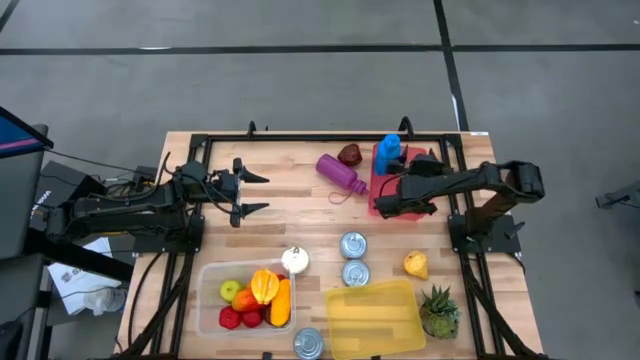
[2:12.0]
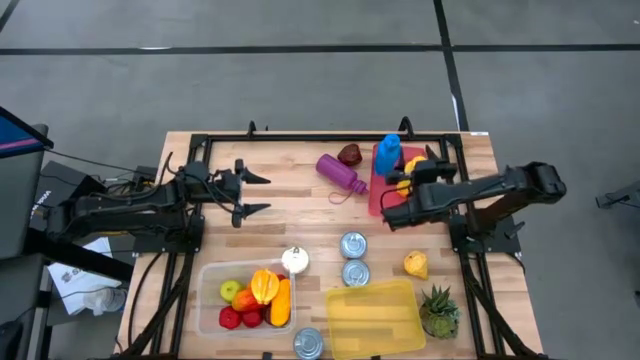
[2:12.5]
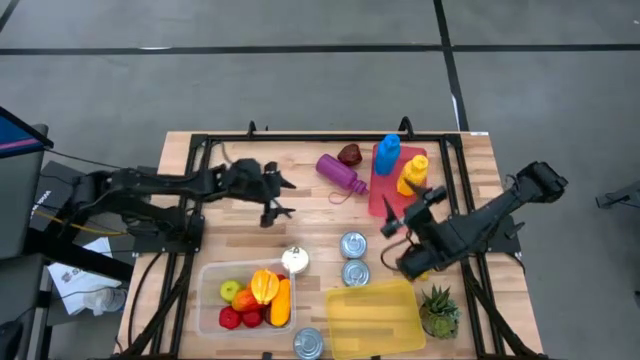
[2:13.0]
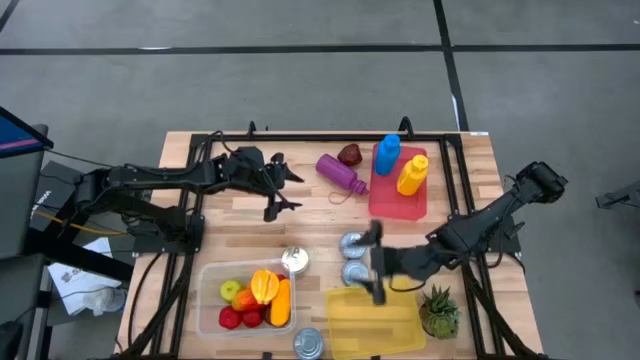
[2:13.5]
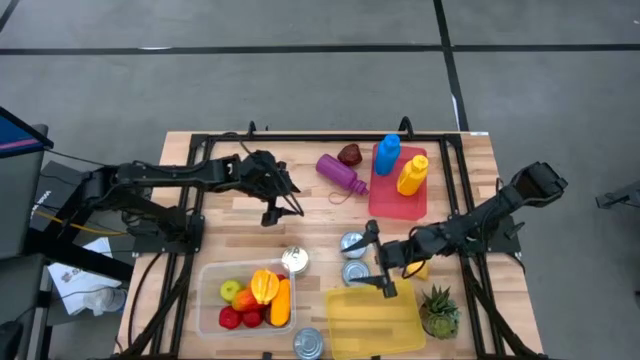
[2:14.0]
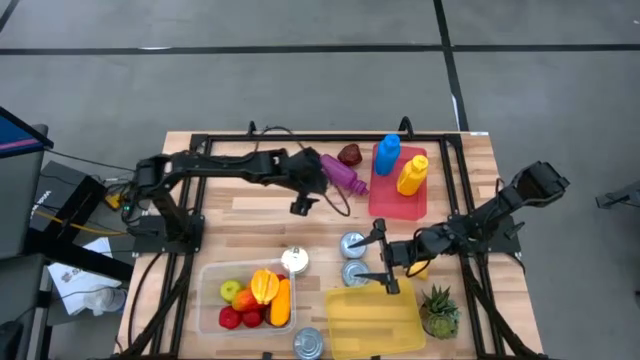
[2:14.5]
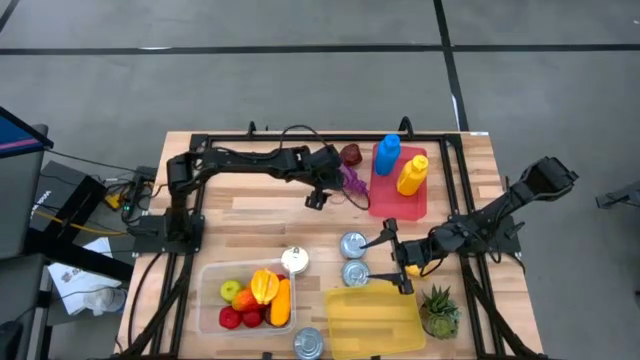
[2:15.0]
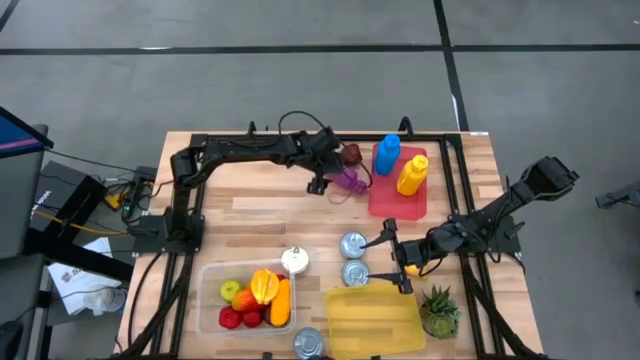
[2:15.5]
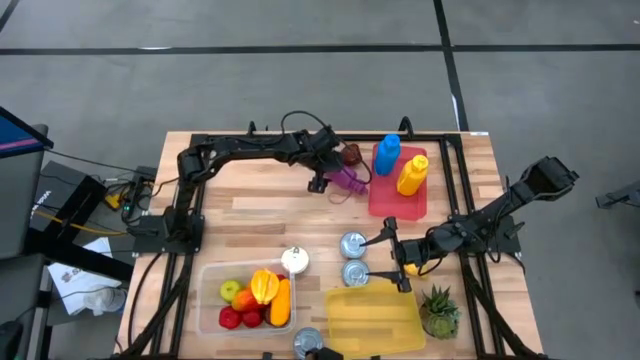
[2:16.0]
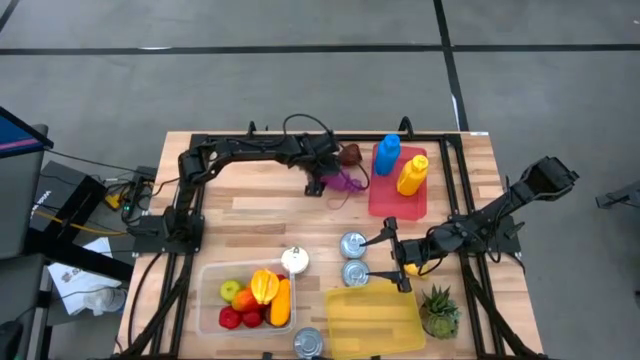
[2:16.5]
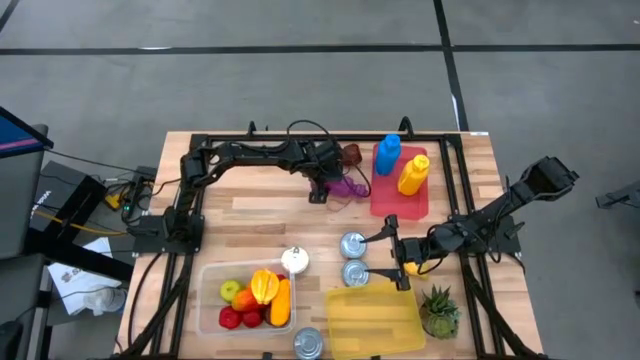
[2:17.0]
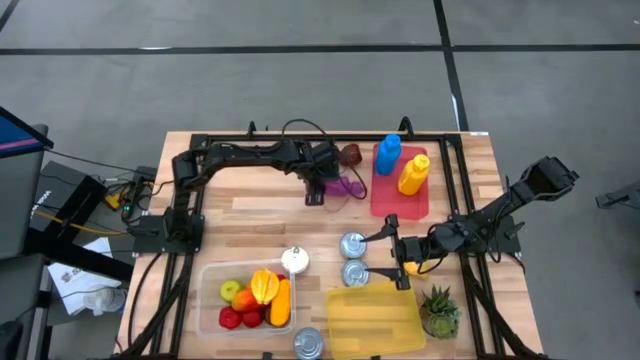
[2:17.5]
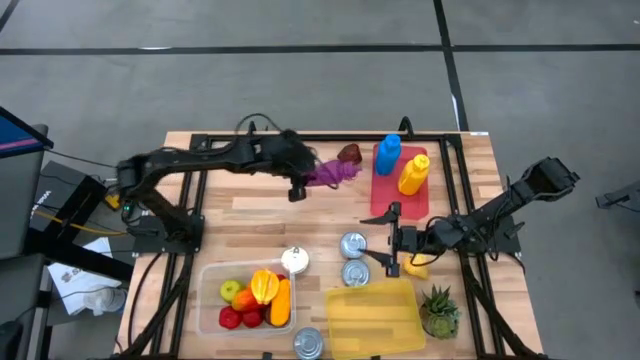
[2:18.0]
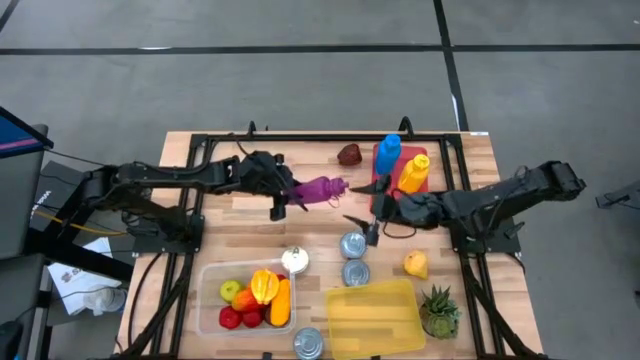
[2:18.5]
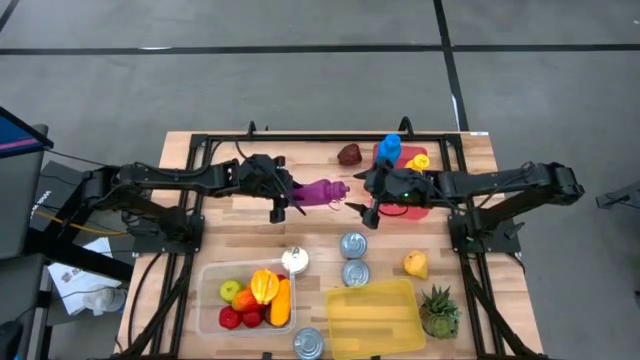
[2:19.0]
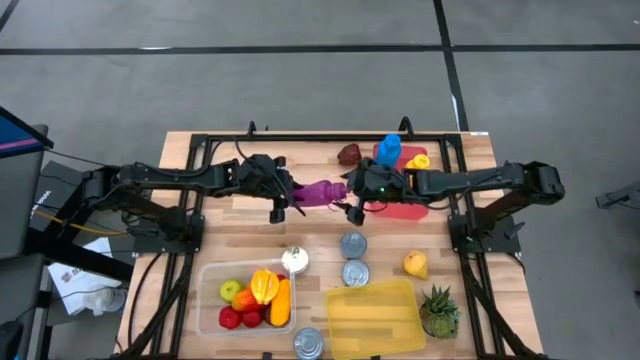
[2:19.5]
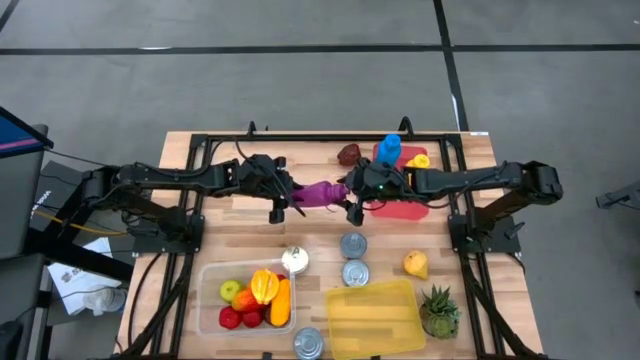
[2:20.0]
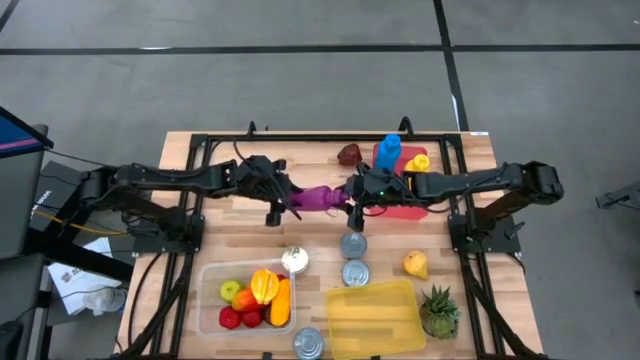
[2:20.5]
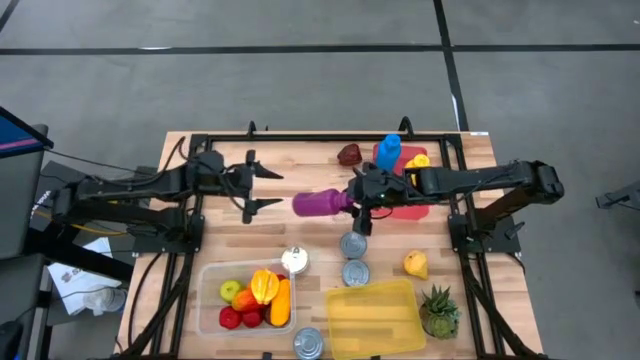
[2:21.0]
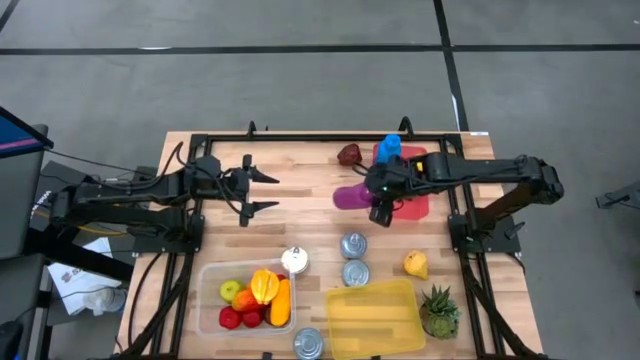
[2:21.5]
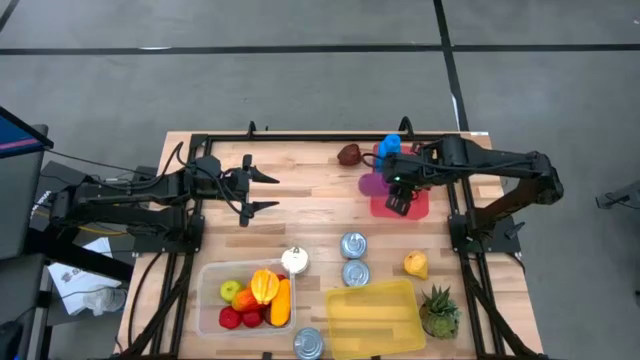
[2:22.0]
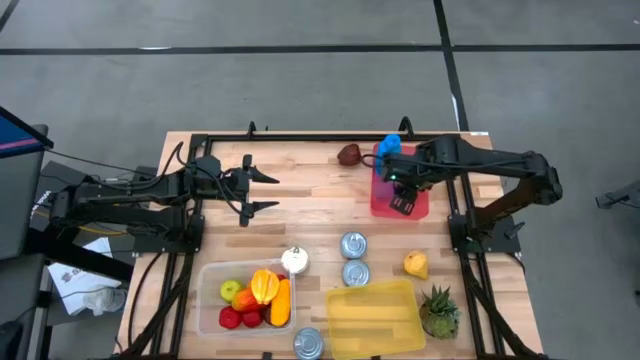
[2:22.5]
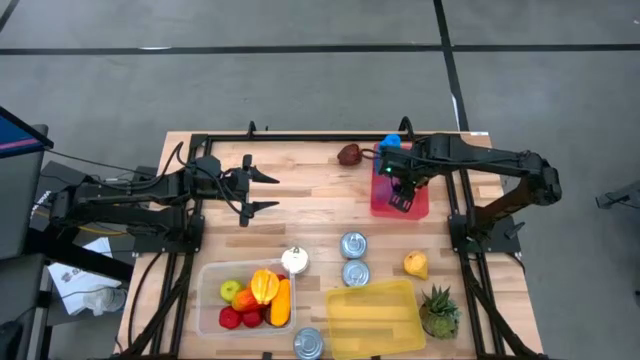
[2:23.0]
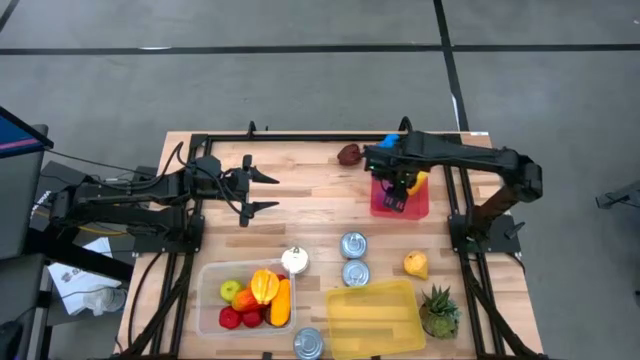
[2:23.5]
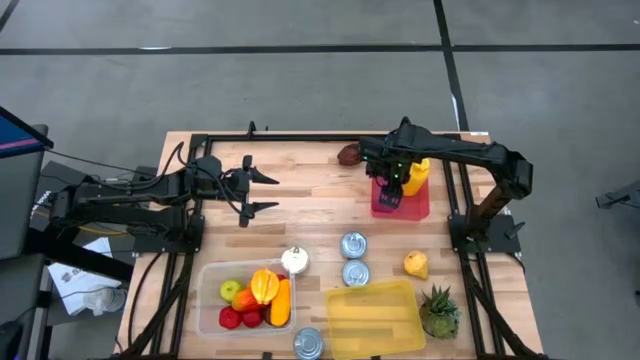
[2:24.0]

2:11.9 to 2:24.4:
Task: Pick & Place Food Item
Put the purple water bottle into the red bin

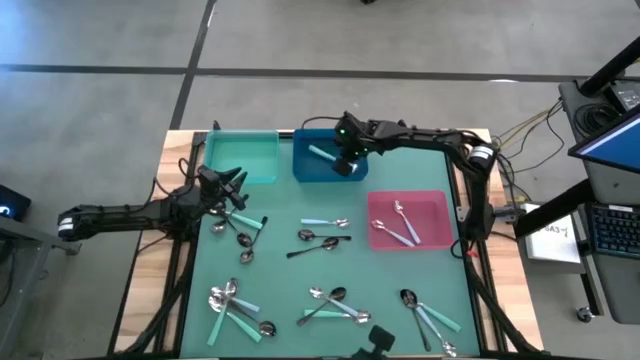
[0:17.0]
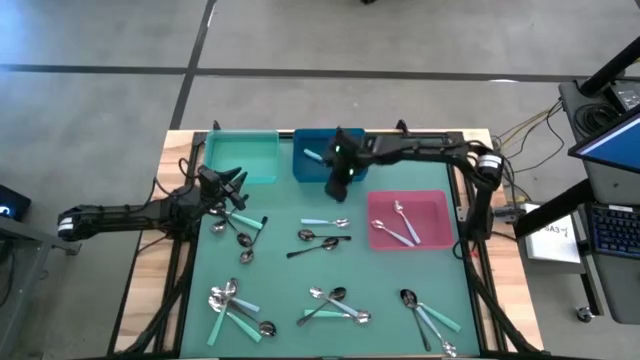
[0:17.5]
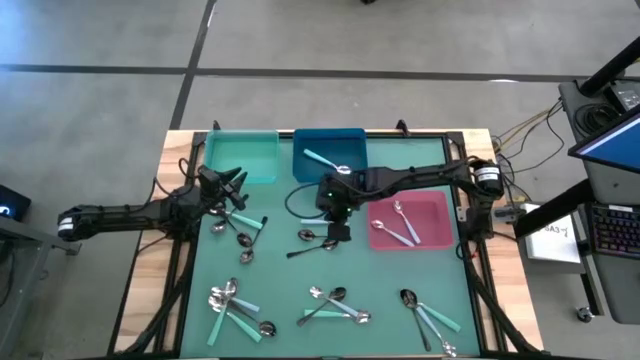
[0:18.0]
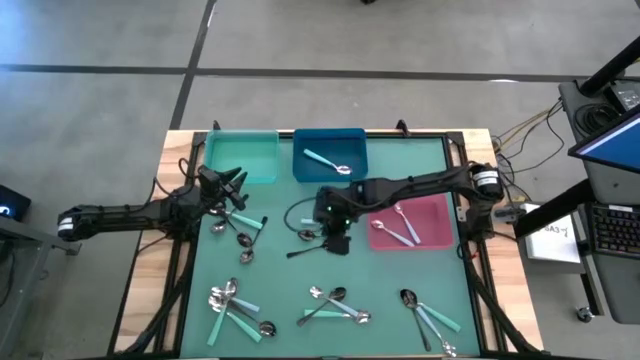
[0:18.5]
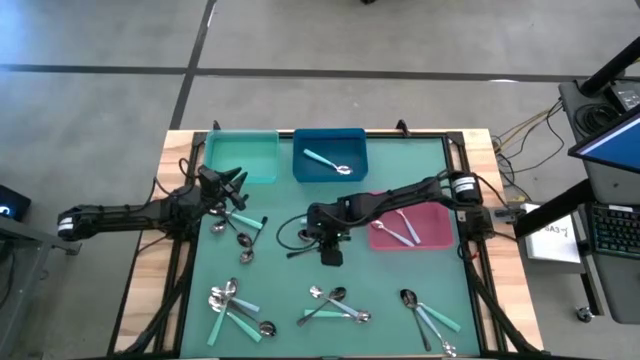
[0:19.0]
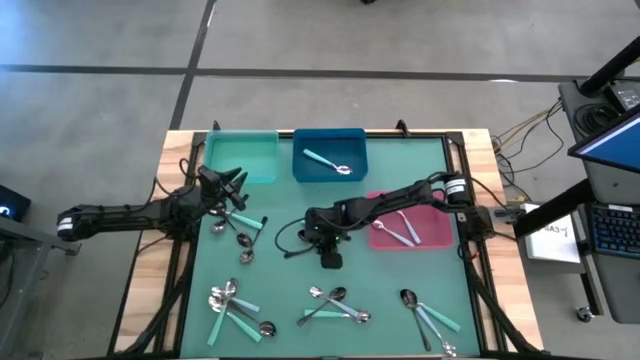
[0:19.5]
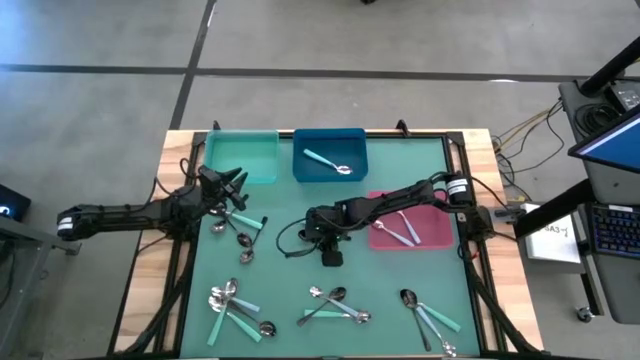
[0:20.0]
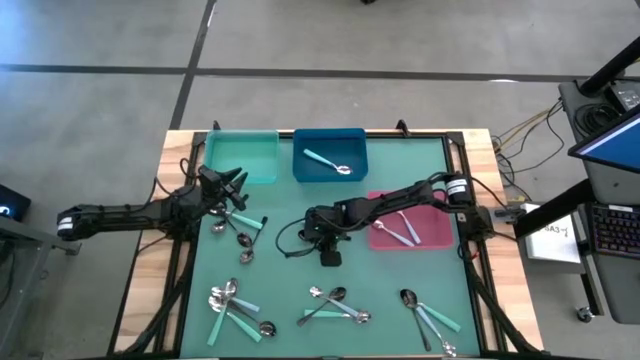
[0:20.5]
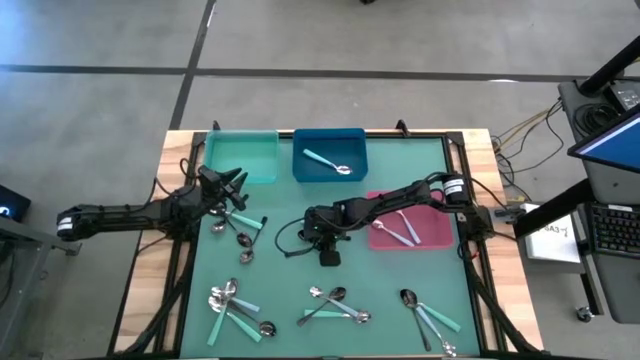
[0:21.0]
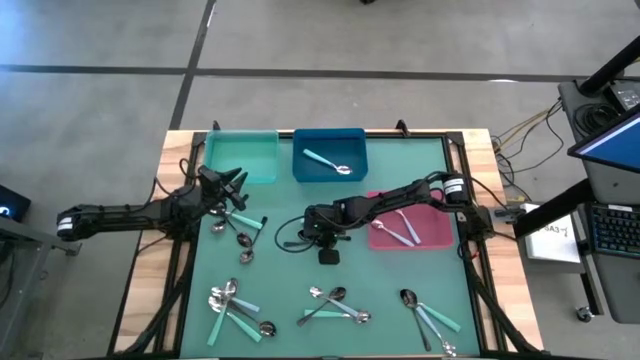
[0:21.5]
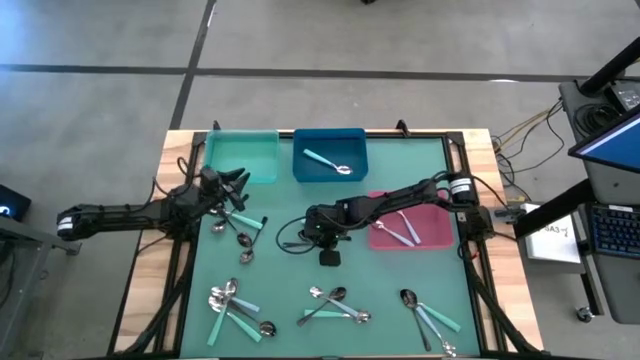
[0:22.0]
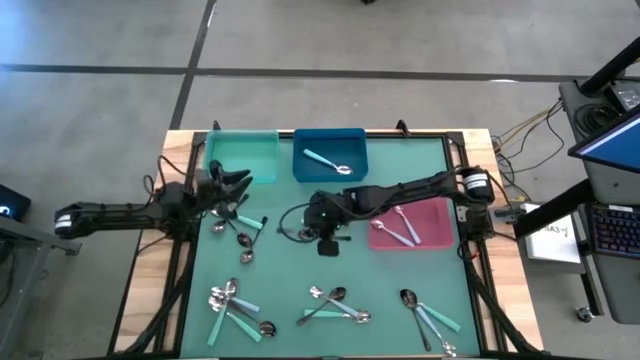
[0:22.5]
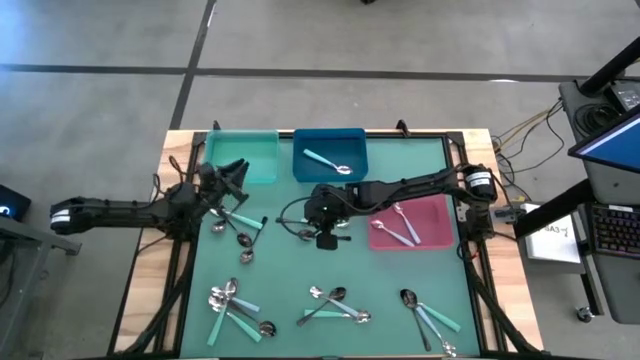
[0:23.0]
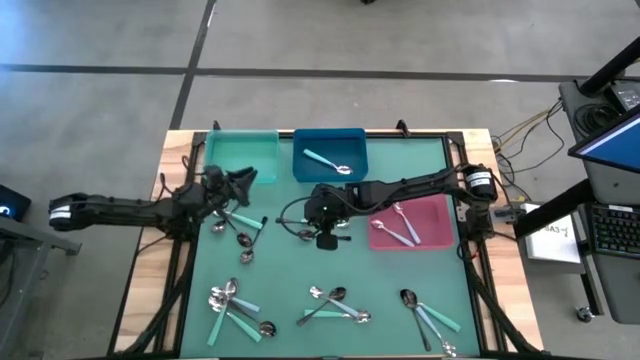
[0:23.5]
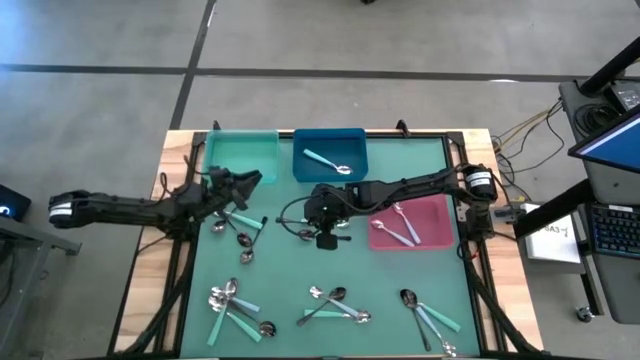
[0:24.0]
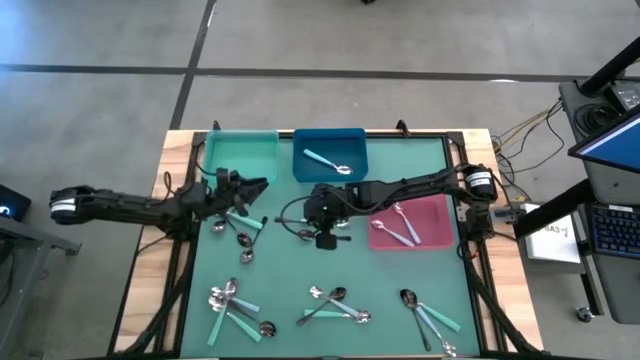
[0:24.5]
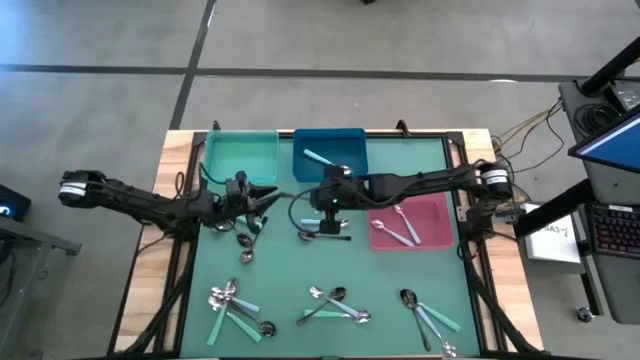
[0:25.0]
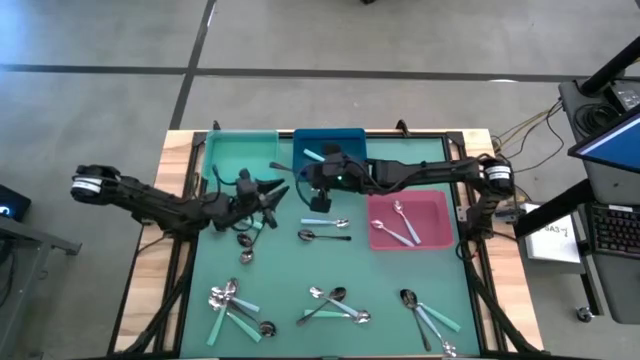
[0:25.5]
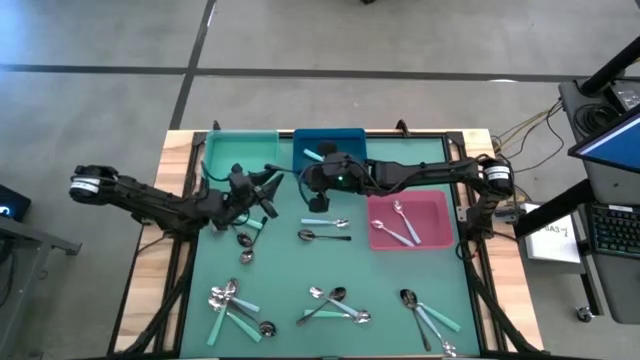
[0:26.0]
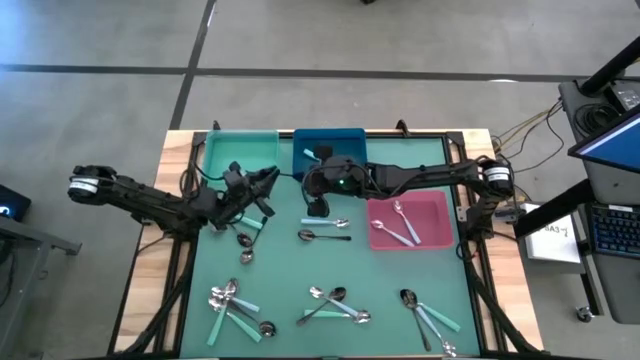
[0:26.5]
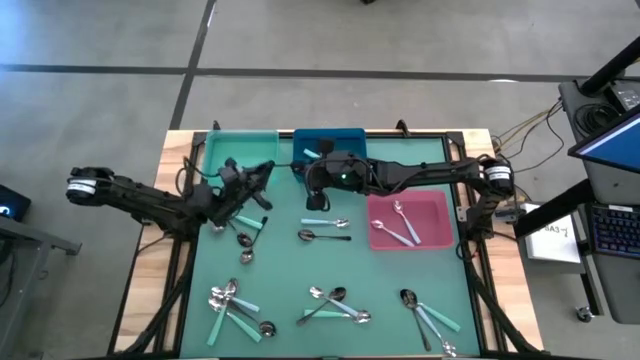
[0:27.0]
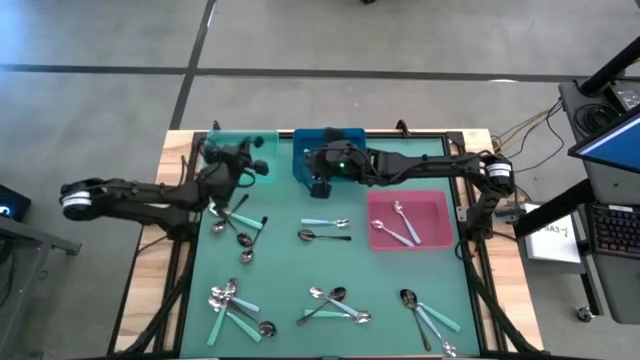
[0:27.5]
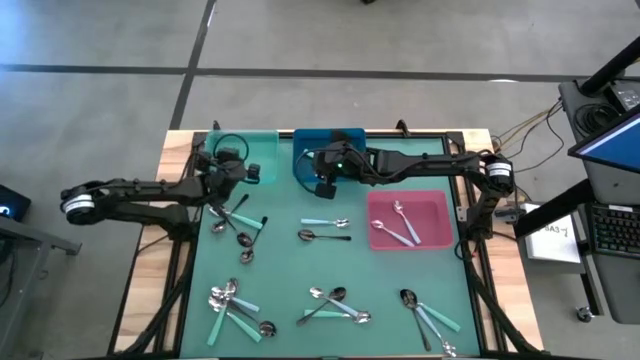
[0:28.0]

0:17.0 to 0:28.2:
Task: Sort silverware by color (type)
Put the black spoon into the green bin
